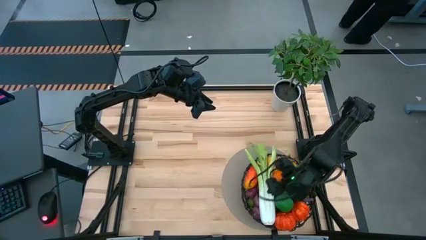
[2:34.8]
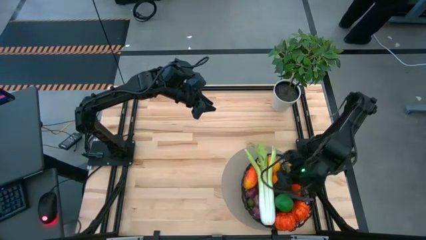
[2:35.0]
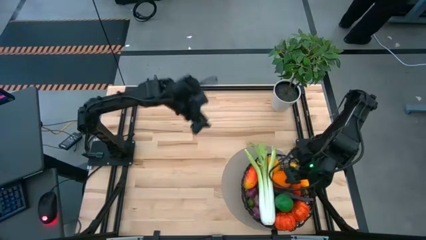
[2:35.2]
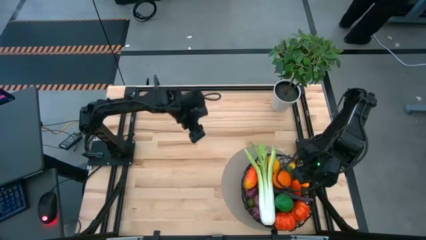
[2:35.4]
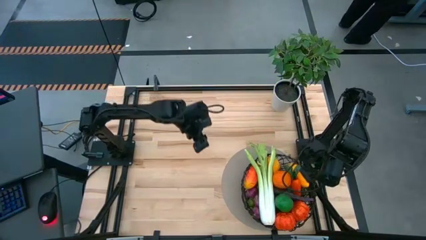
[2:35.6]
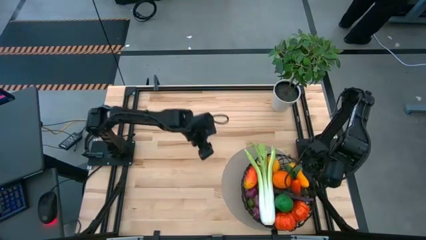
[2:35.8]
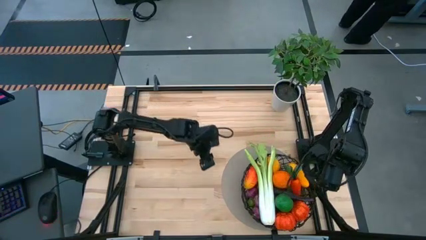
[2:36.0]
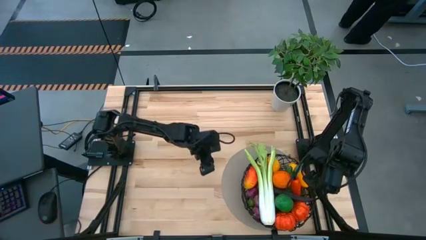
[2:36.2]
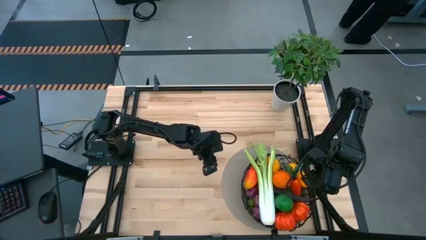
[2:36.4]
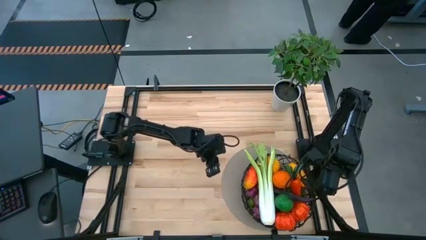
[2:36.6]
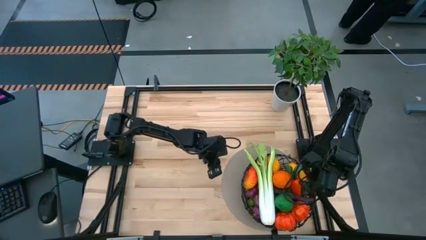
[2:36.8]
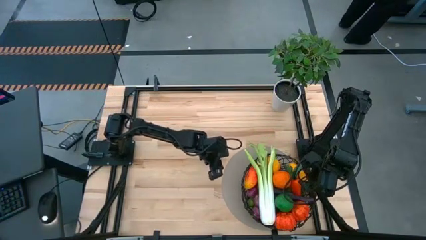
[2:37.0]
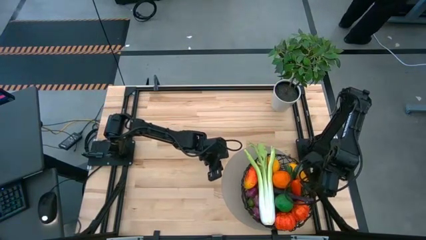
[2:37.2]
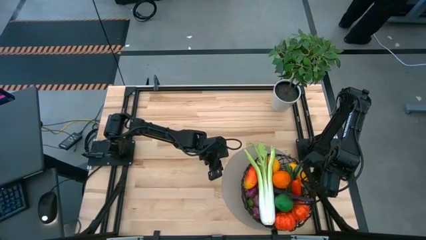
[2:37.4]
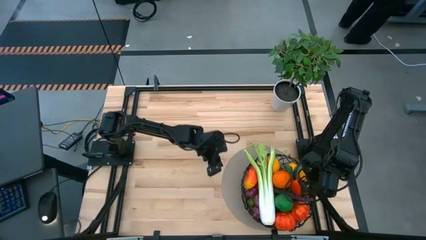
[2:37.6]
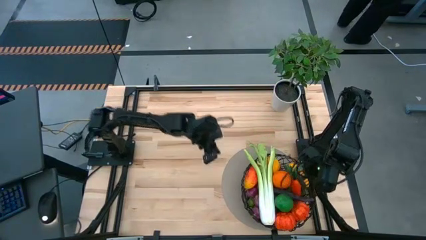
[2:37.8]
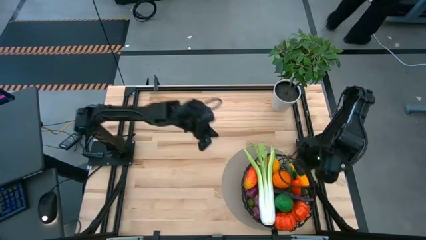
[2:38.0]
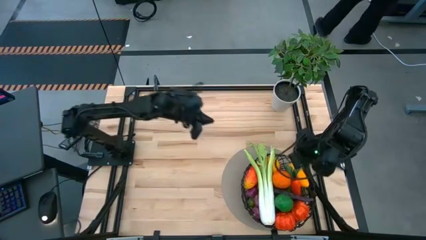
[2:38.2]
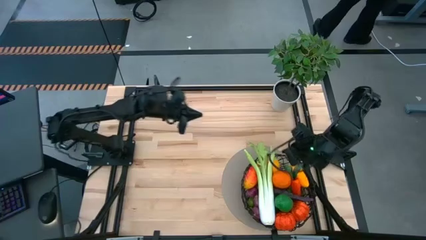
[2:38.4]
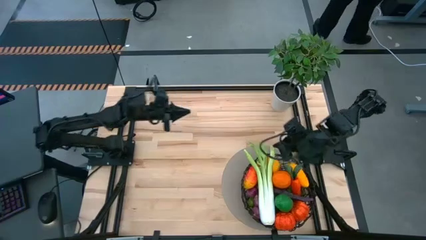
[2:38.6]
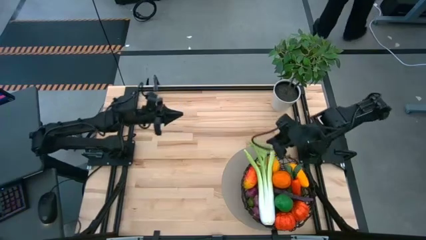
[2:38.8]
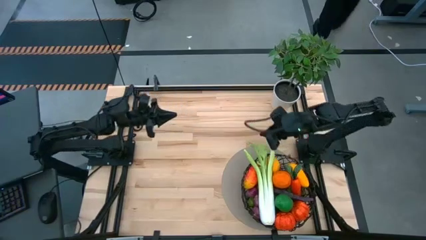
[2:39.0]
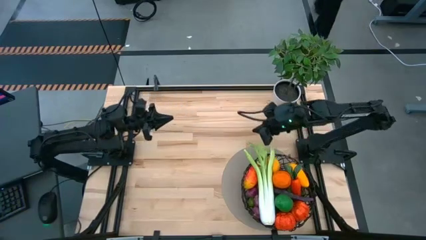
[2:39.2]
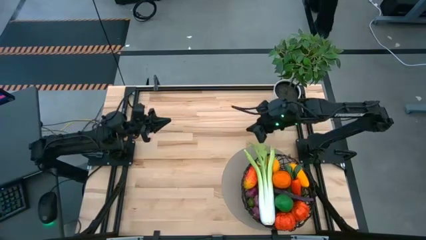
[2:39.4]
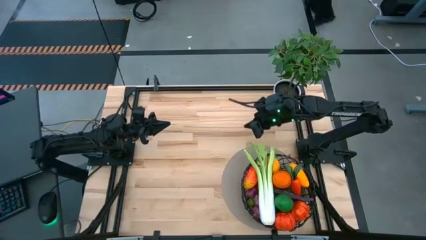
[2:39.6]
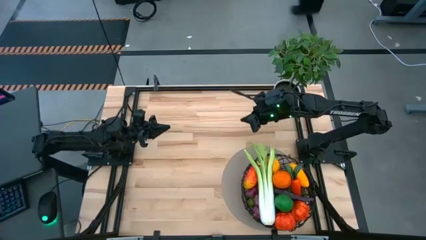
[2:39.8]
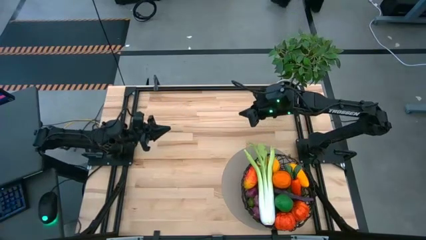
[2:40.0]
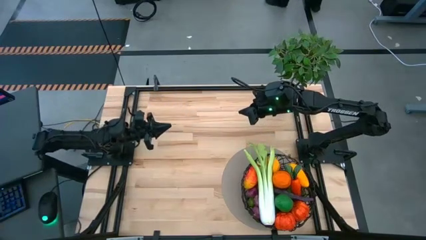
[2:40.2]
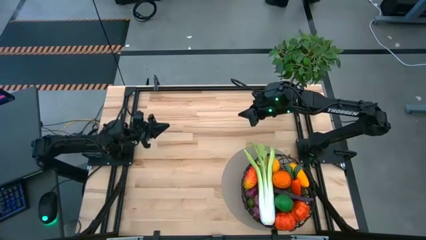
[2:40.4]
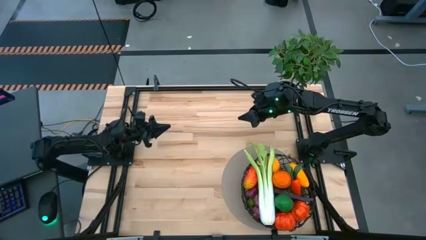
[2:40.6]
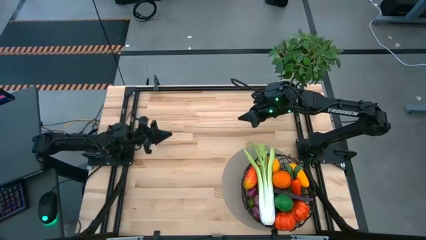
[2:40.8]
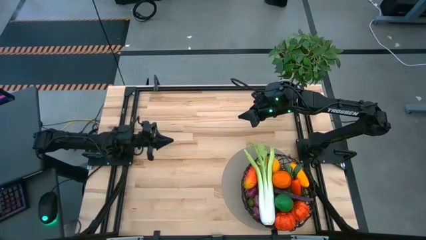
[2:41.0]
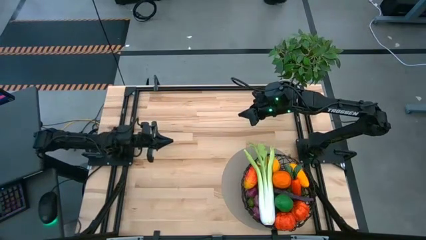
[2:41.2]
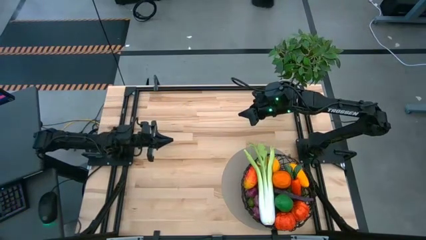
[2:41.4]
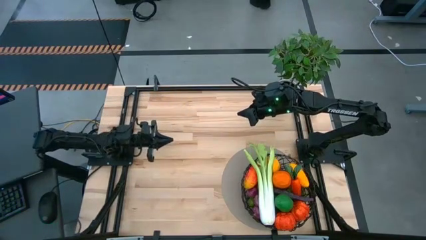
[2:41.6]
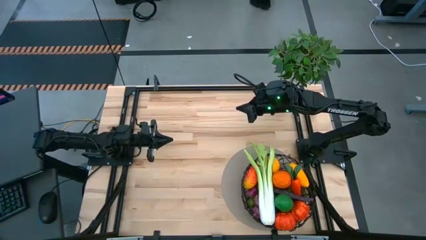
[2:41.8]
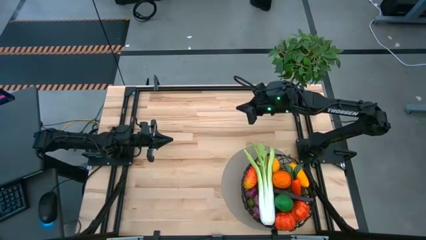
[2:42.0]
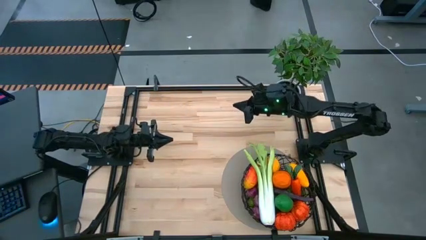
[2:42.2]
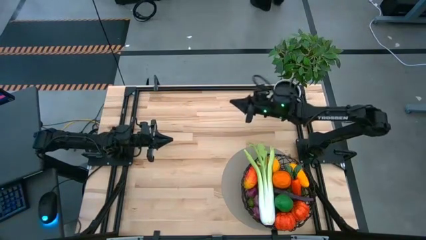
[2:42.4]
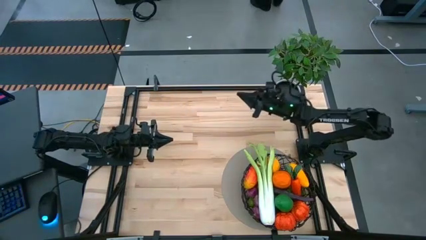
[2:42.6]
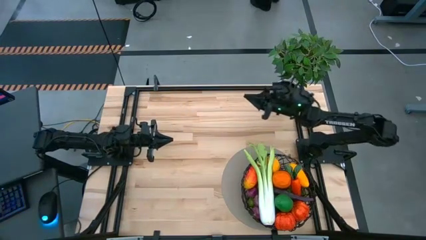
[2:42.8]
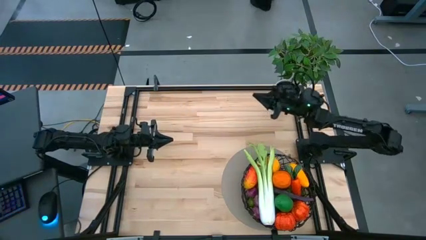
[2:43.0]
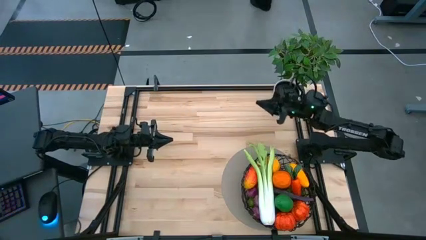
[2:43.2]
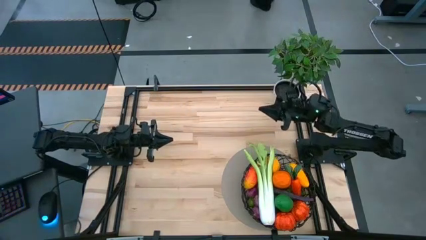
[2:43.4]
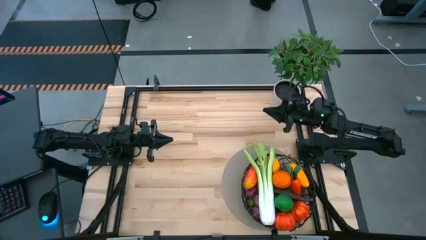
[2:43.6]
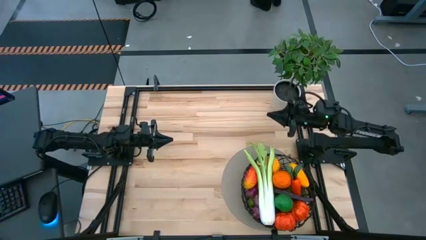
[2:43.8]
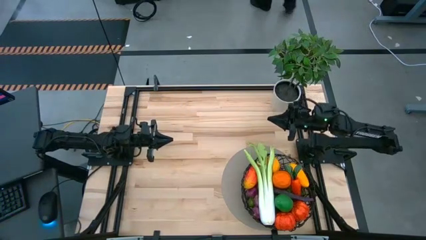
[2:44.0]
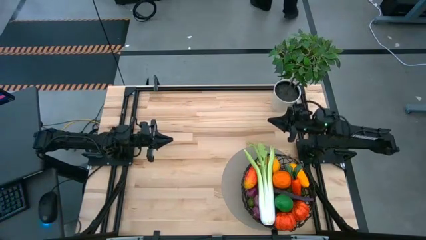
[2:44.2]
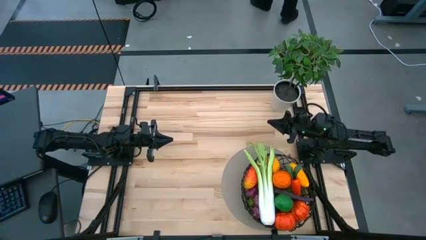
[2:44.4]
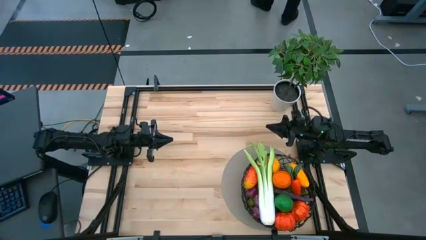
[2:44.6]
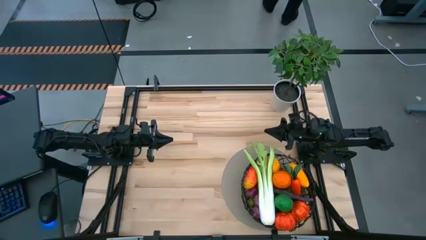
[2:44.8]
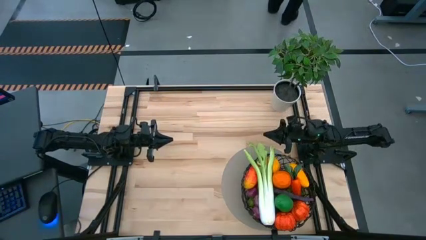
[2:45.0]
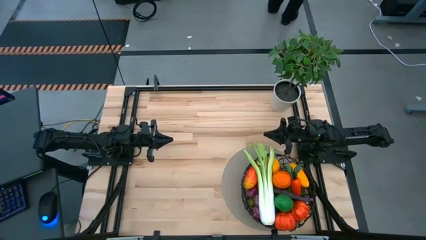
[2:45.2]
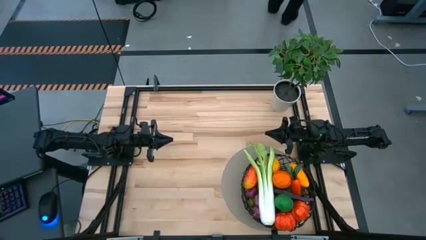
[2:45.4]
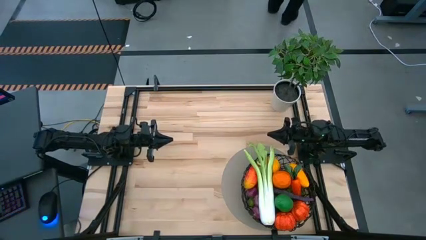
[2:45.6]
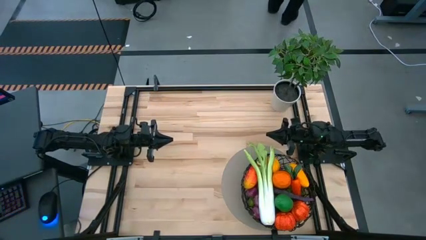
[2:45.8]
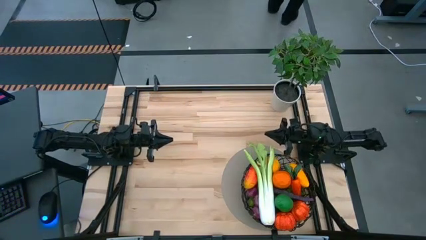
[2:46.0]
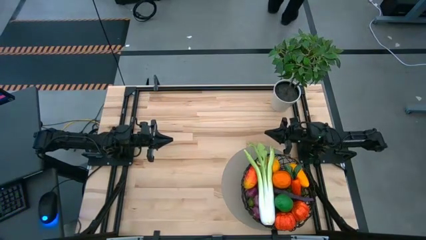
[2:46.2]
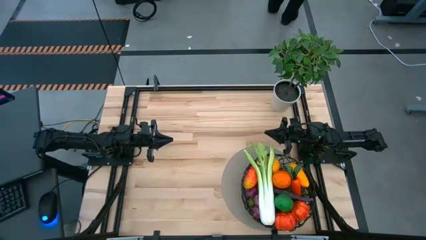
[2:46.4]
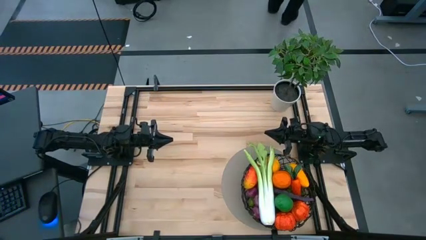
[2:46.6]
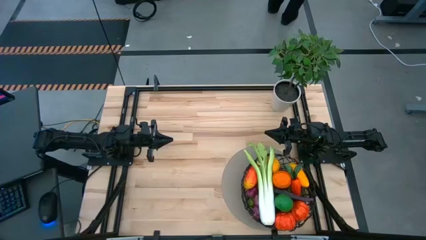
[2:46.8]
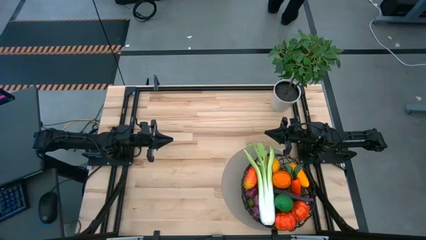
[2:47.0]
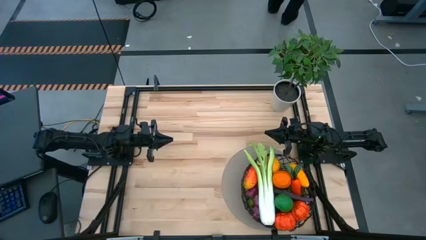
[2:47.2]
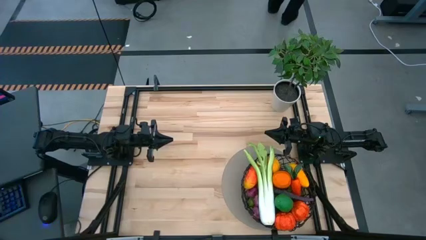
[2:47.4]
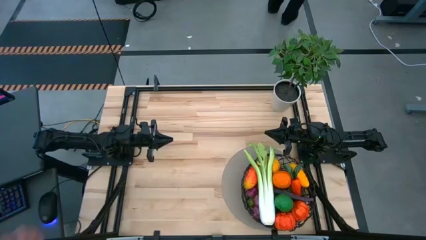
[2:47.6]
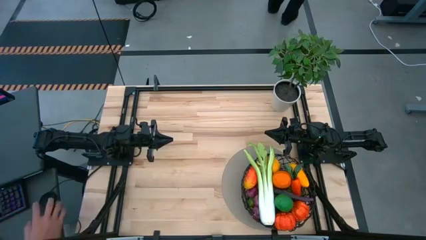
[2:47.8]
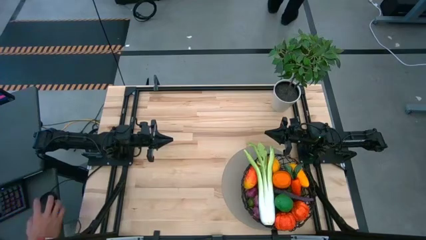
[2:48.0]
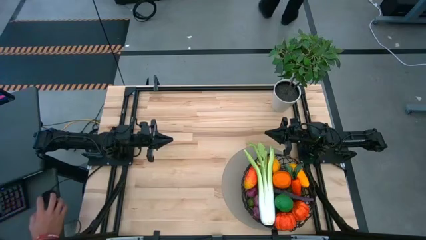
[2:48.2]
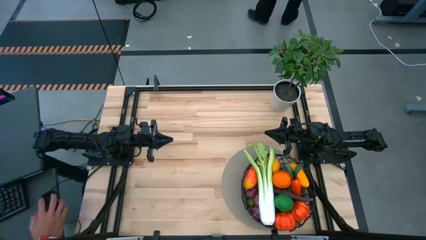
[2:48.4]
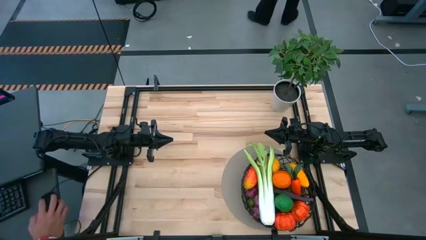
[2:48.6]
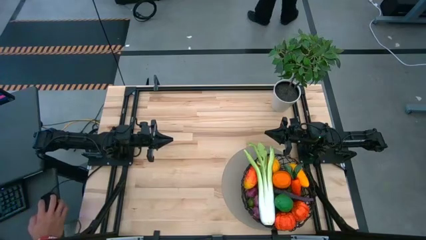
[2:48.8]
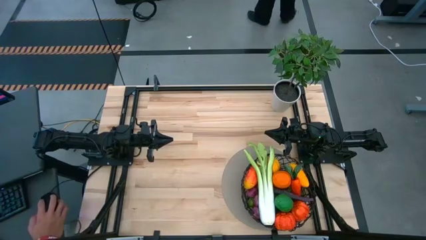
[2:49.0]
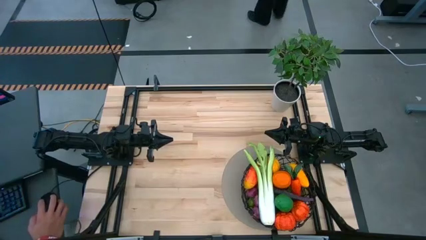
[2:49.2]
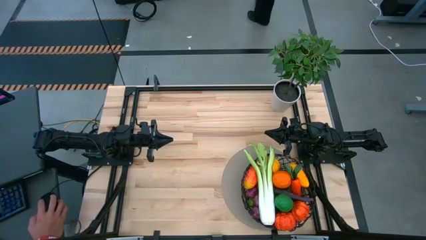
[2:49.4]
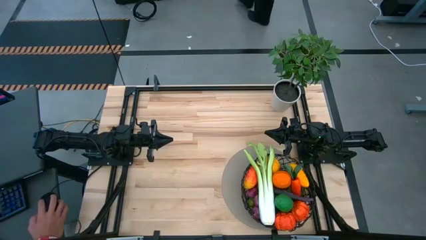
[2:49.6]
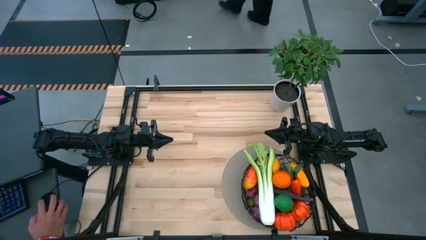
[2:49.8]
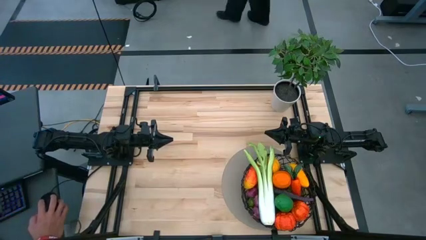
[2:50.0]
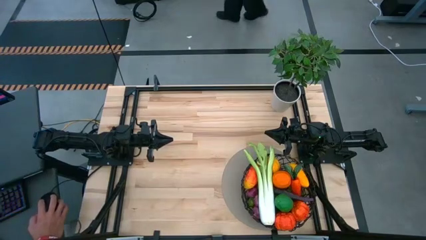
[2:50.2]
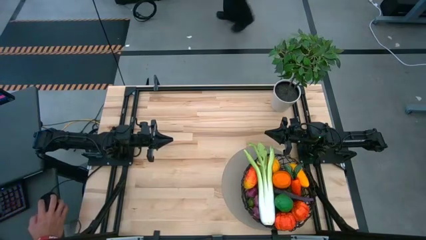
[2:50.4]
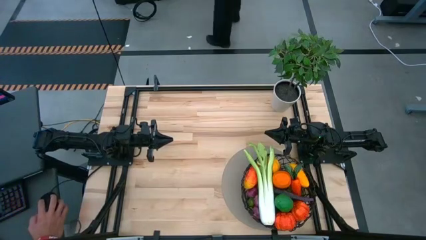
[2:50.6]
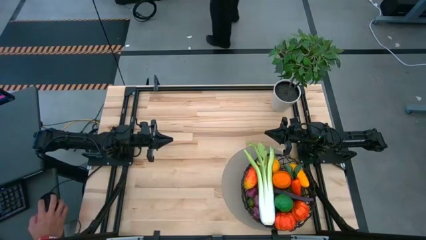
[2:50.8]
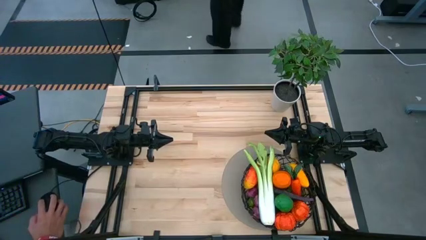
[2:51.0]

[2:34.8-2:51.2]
Task: Build produce basket
Return to Home Position
